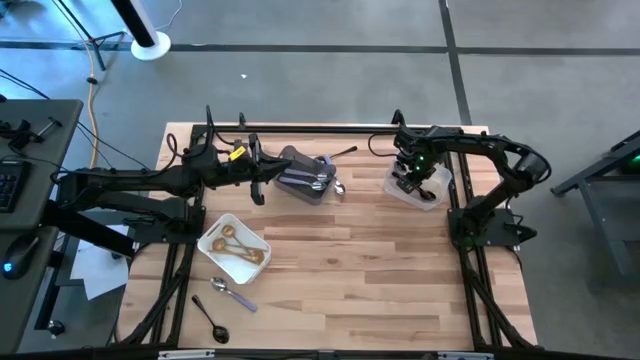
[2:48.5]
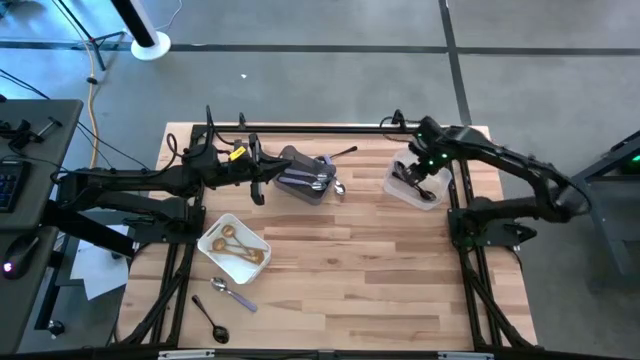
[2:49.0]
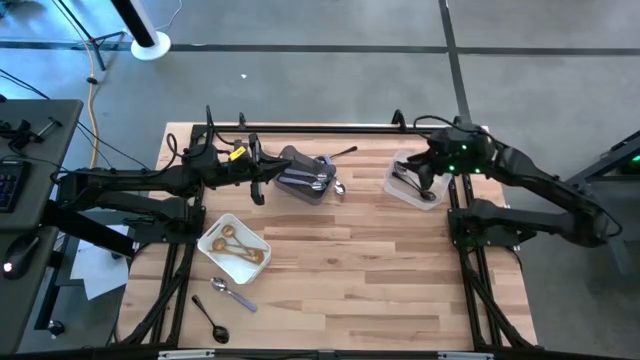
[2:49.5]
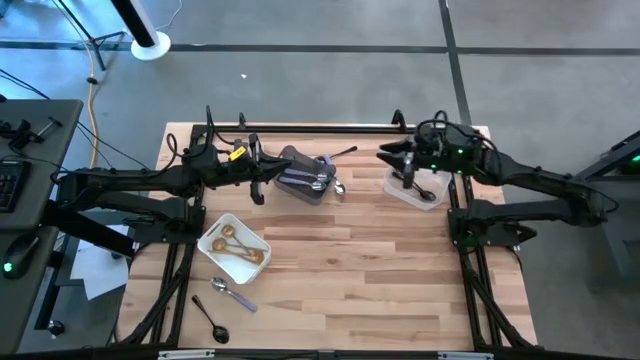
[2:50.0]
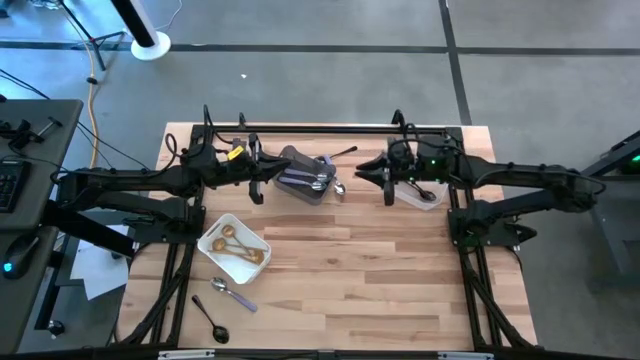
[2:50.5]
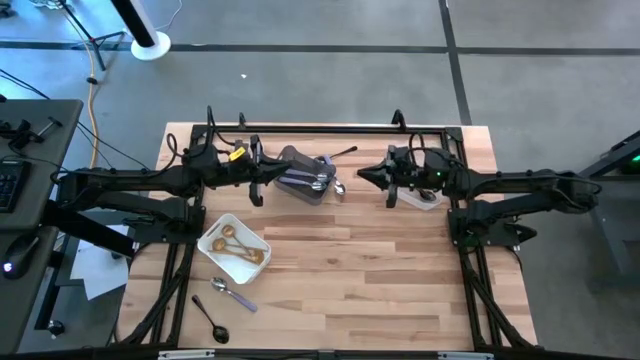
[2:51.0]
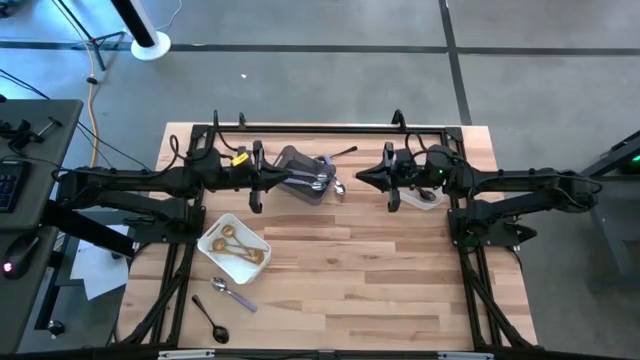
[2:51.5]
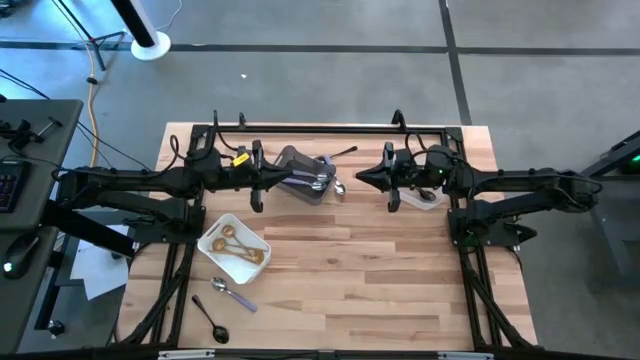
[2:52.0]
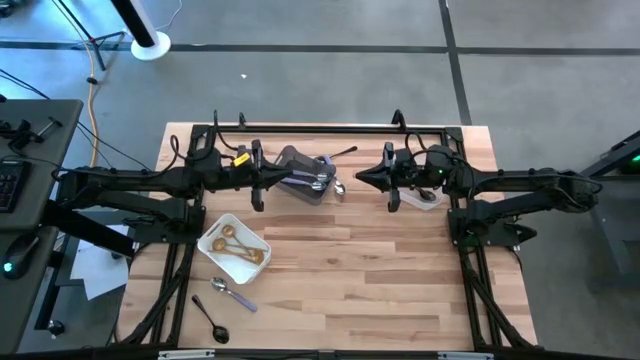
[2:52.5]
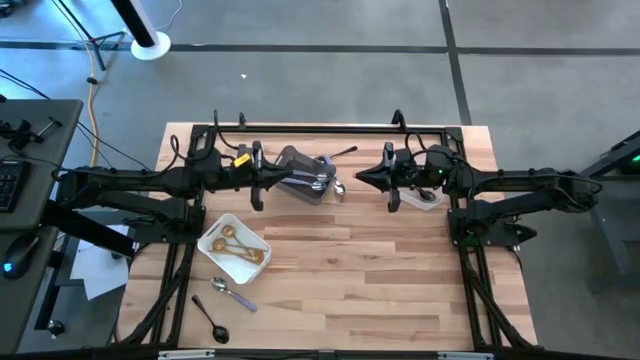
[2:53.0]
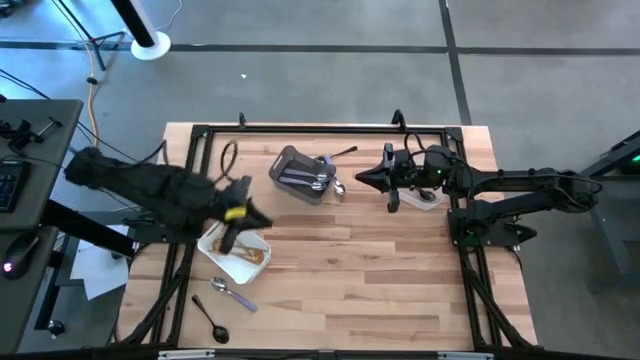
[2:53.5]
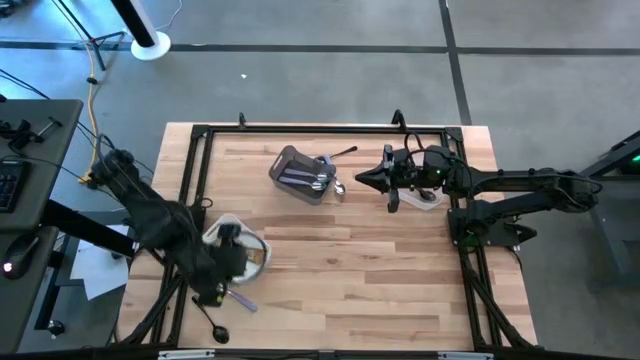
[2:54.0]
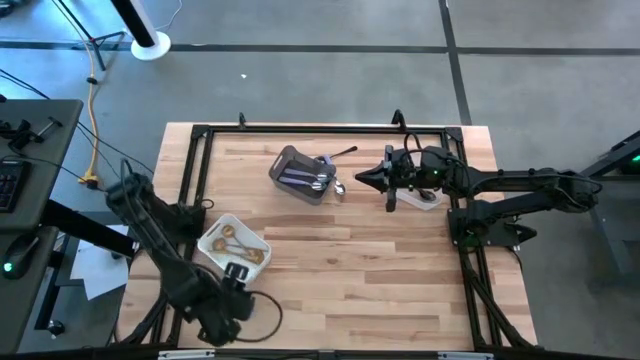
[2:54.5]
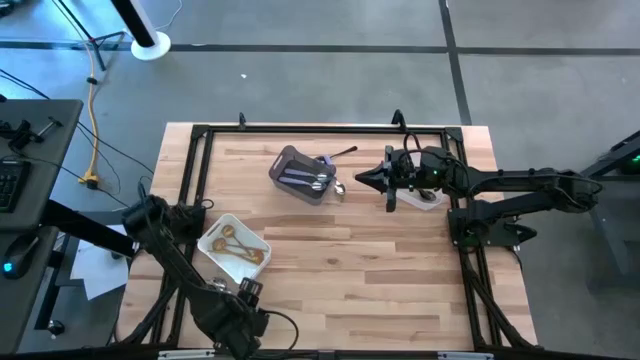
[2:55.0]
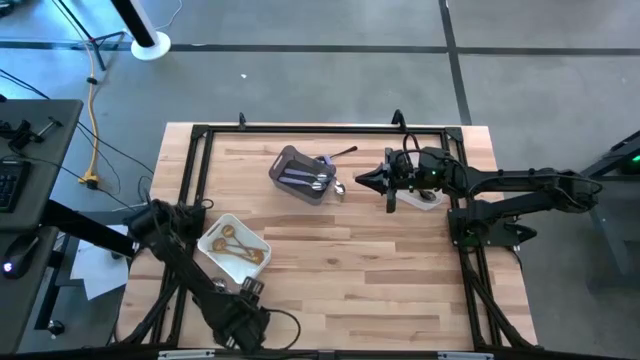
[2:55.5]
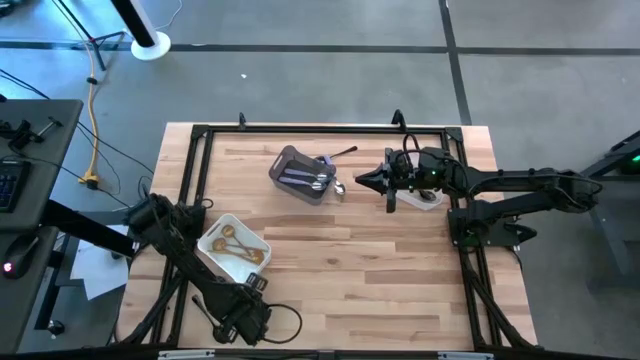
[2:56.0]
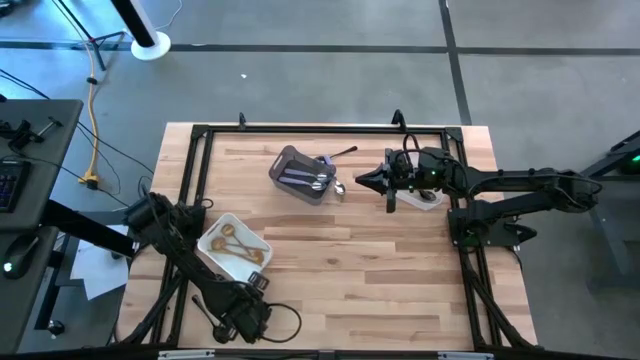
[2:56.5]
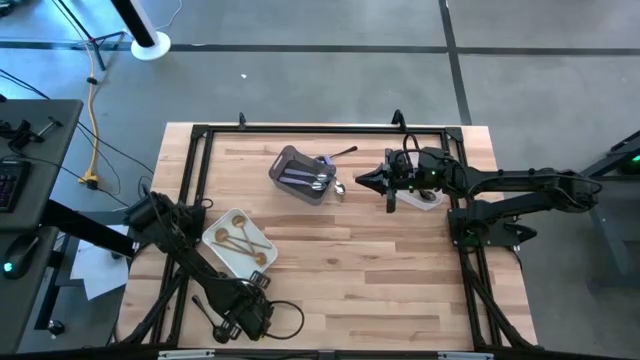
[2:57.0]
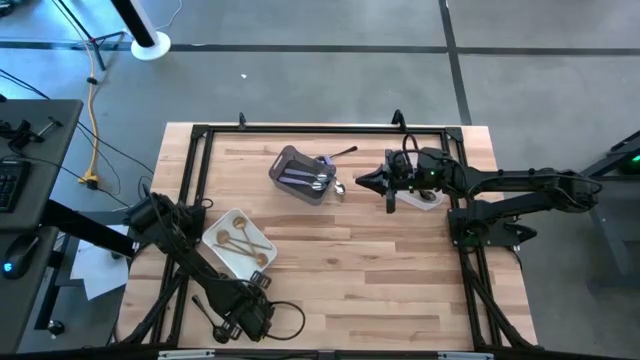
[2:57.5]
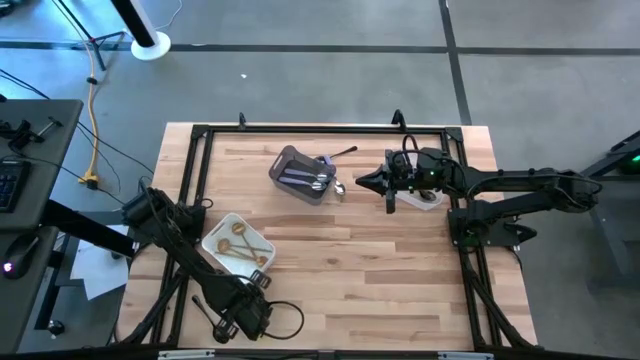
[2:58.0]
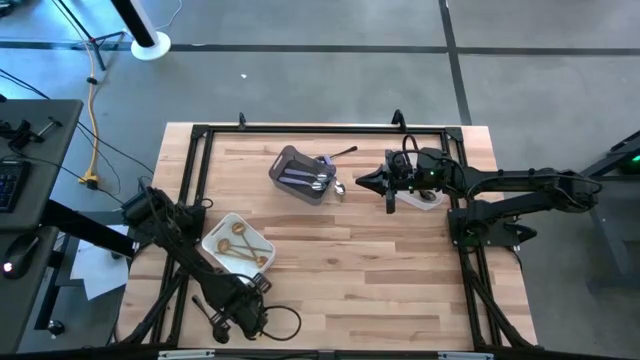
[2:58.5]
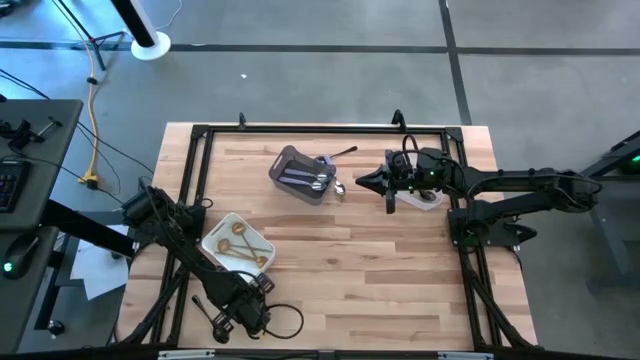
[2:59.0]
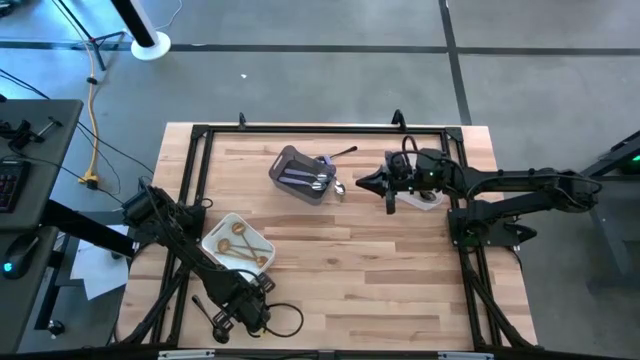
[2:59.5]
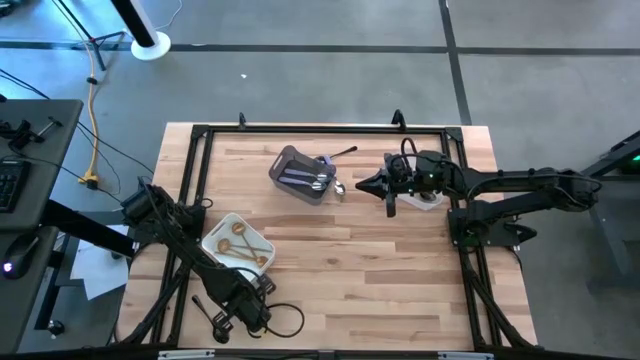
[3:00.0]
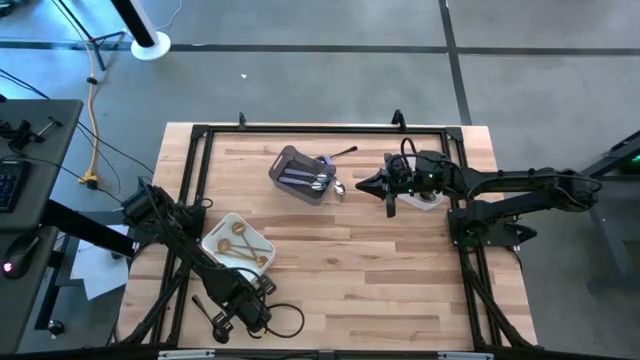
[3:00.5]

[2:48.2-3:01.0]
Task: Sort silverware by color (type)
Put the bottom purple spoon into the black bin

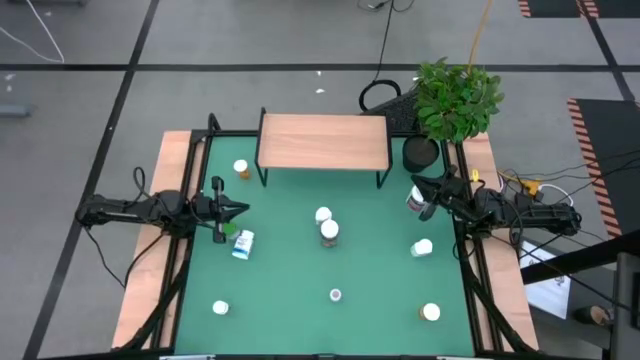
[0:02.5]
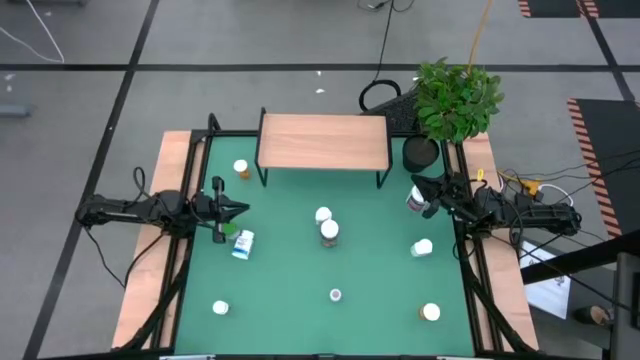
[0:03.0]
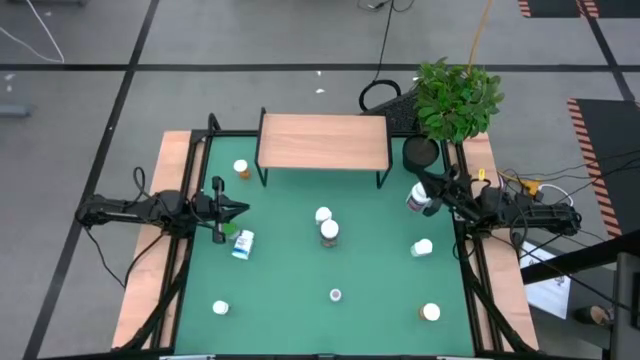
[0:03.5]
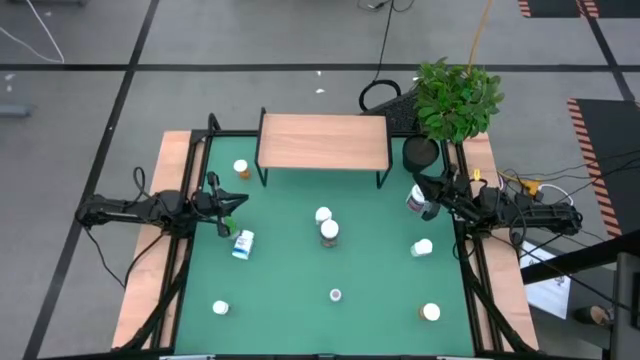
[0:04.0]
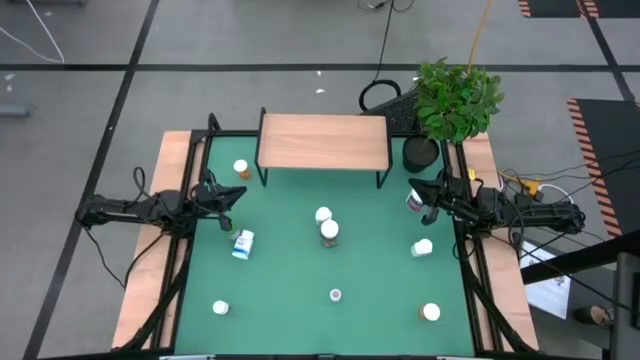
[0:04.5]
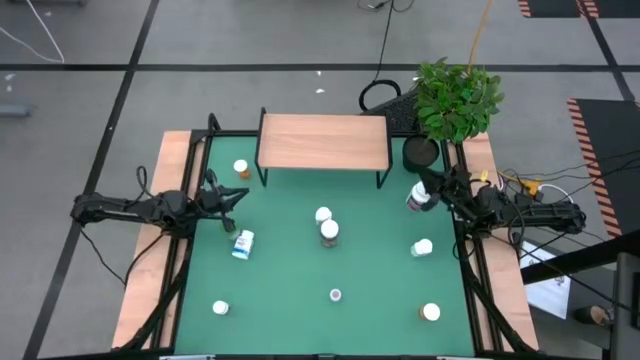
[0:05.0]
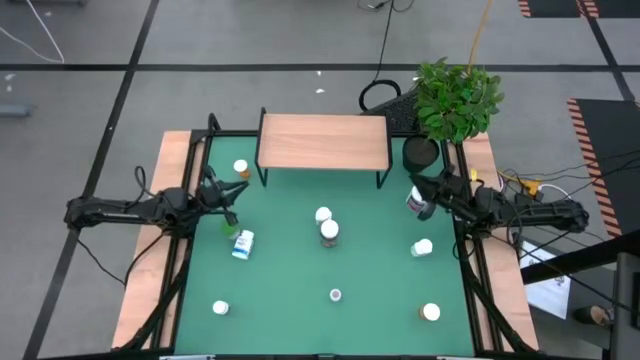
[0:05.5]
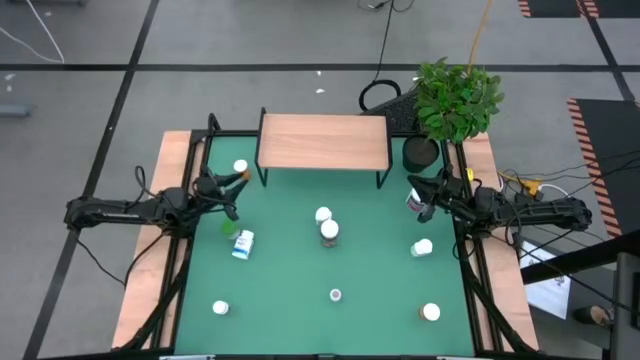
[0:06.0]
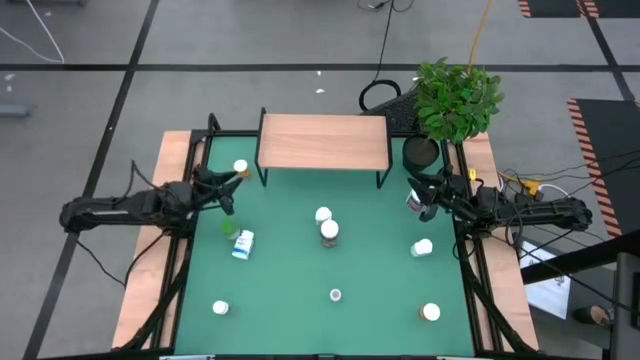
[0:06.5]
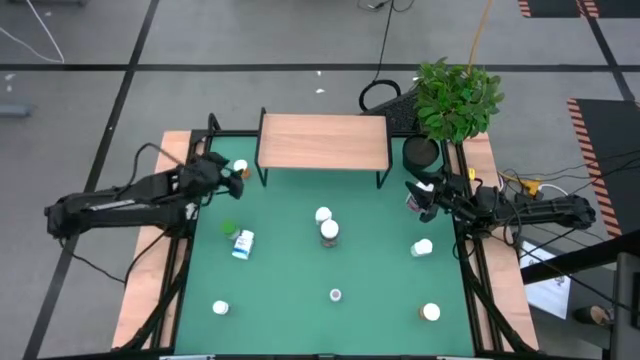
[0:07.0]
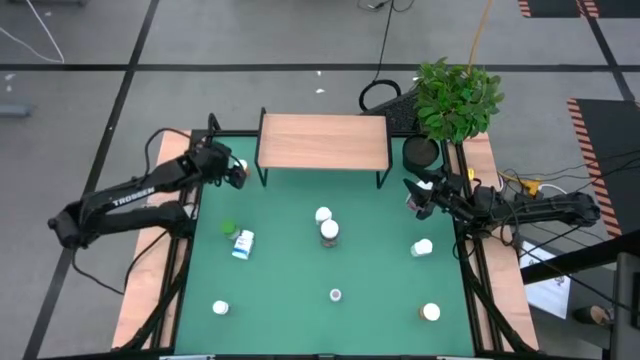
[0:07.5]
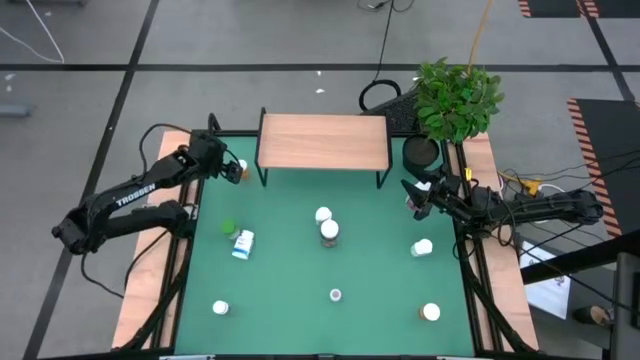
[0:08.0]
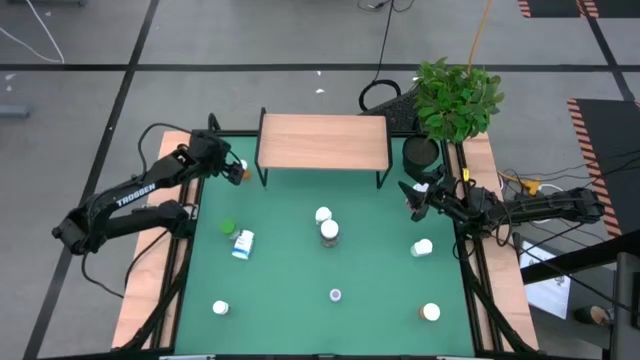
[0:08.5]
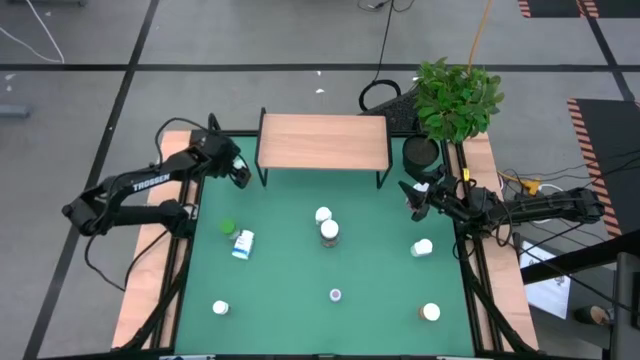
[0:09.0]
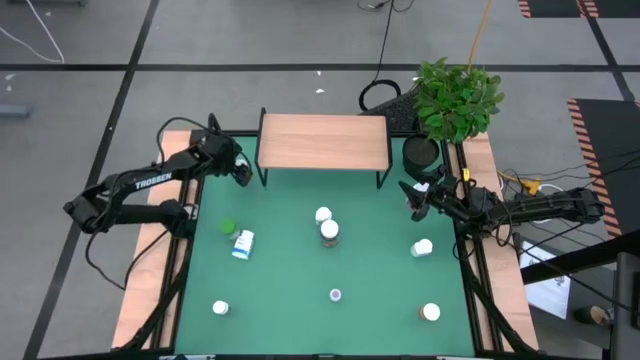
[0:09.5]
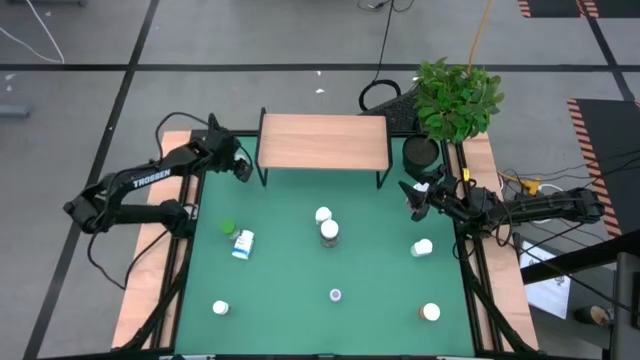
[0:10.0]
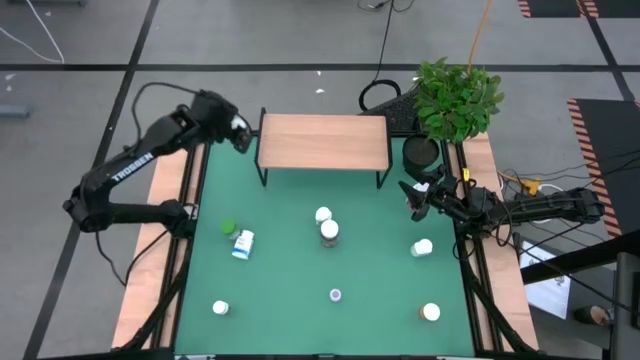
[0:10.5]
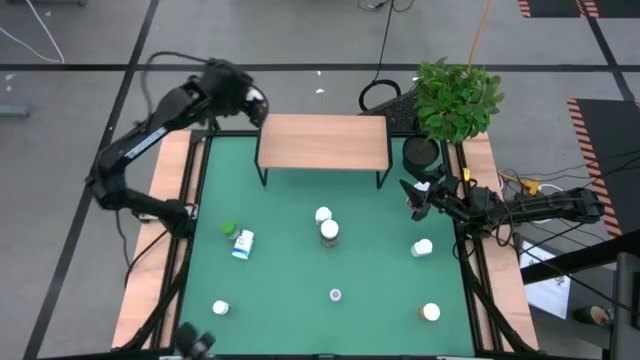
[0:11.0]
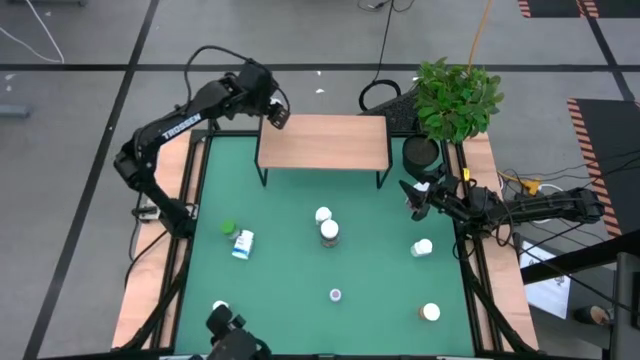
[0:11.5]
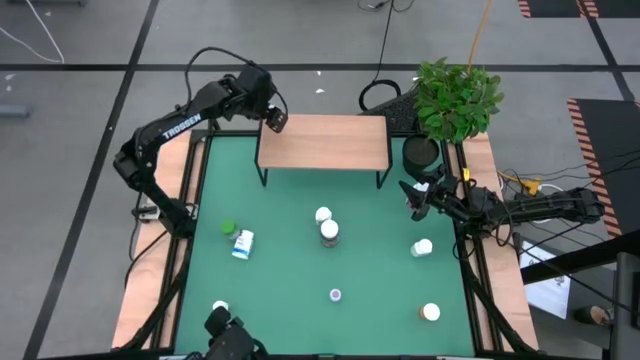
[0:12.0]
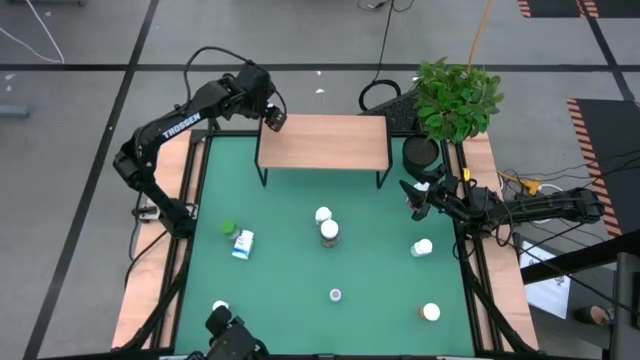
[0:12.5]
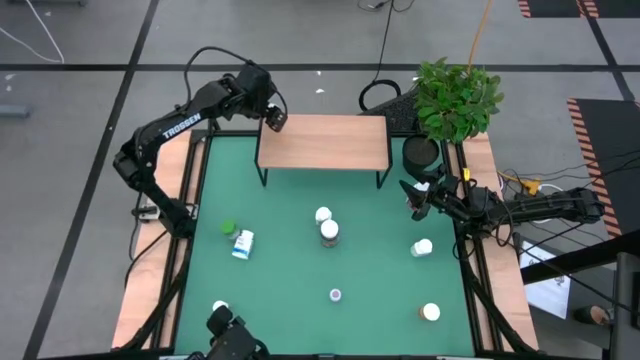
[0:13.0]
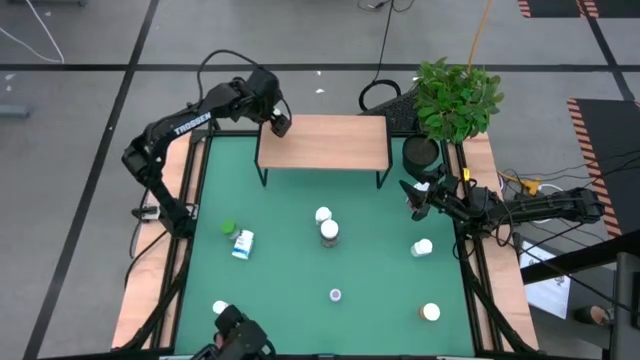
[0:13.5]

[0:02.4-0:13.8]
Task: Pick and place medicine bottles onto shelf by color
Put the top orange bottle on the shelf
